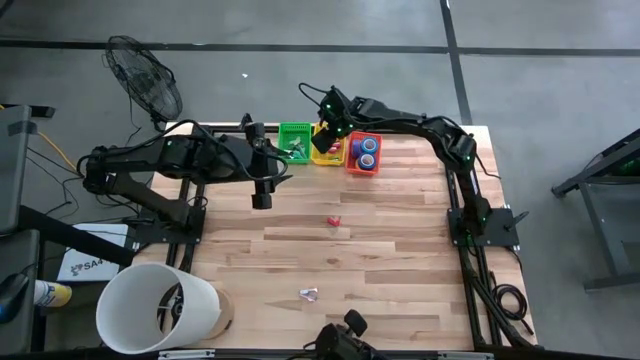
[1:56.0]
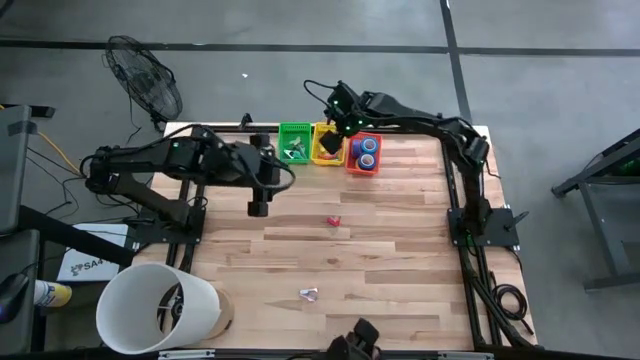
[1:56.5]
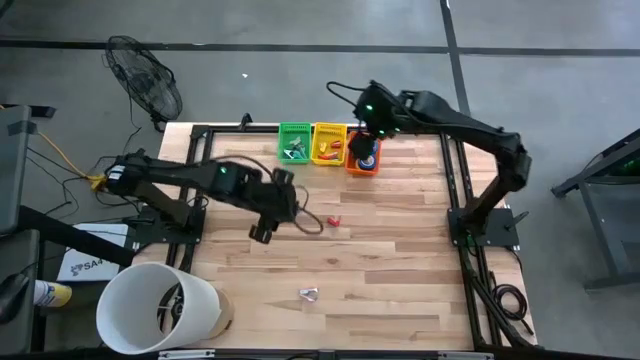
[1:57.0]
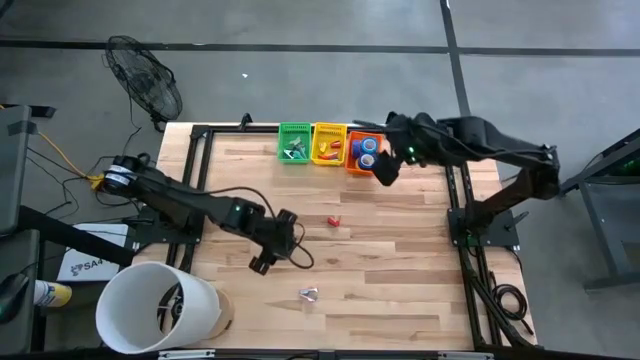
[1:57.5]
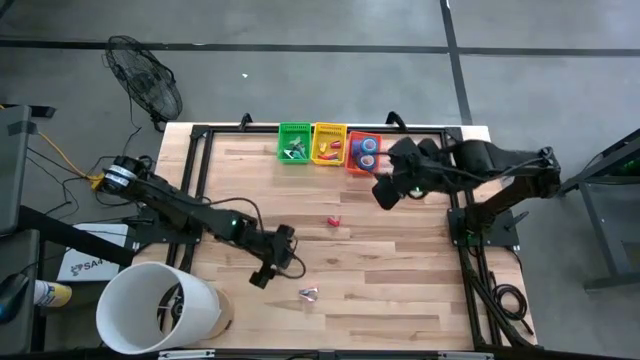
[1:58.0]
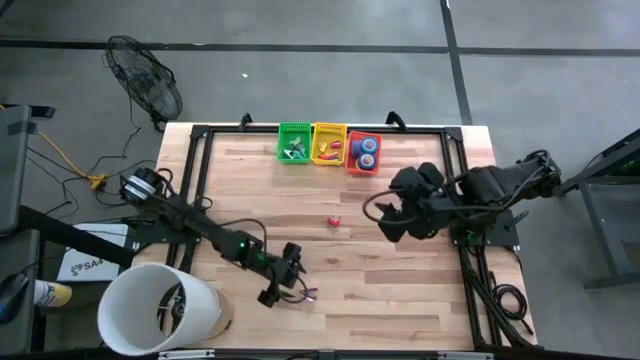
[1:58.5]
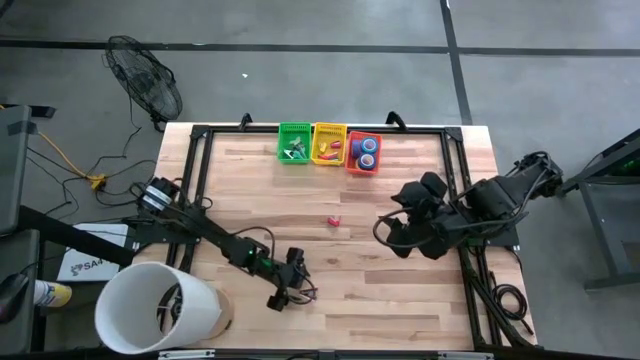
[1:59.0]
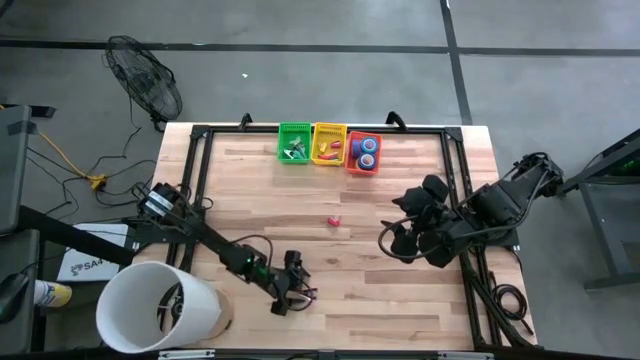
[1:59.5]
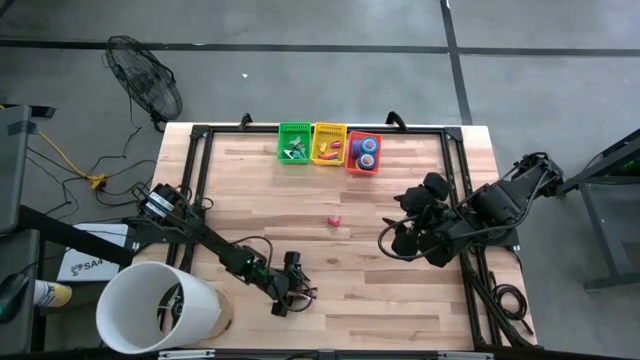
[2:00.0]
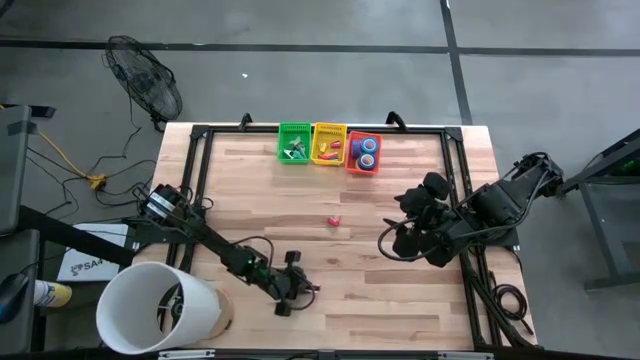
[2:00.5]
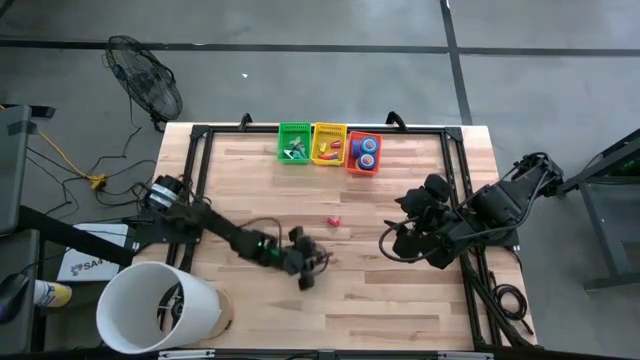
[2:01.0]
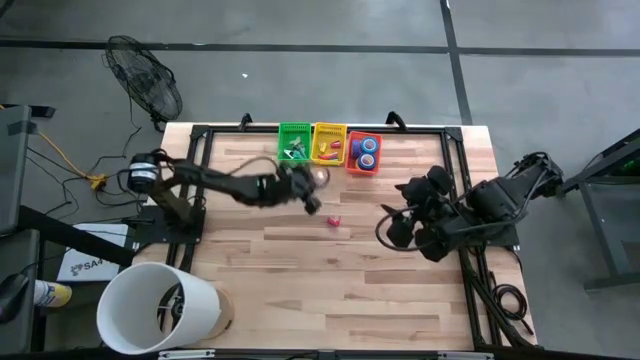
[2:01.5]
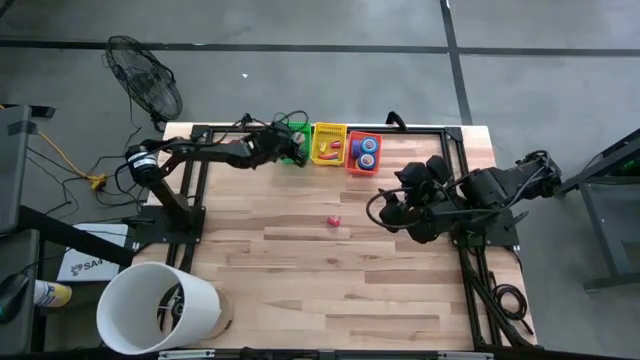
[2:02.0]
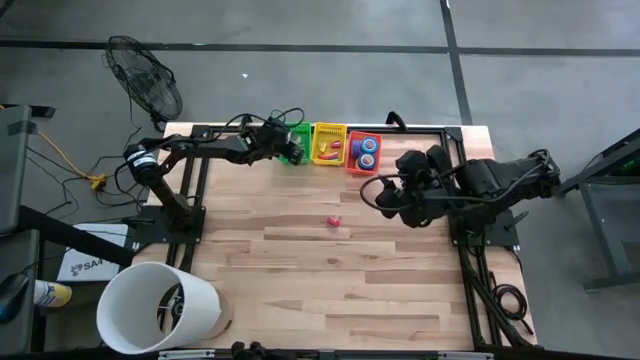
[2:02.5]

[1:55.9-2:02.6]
Task: Pick and place Stapler, Stapler remover, tape
Put the pink staple remover into the green bin

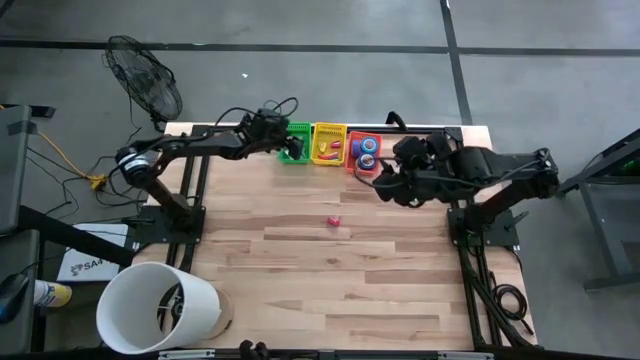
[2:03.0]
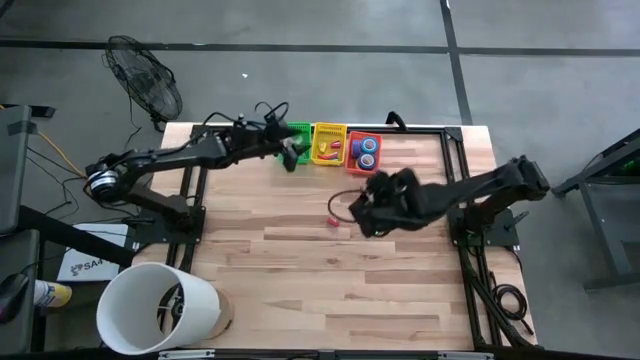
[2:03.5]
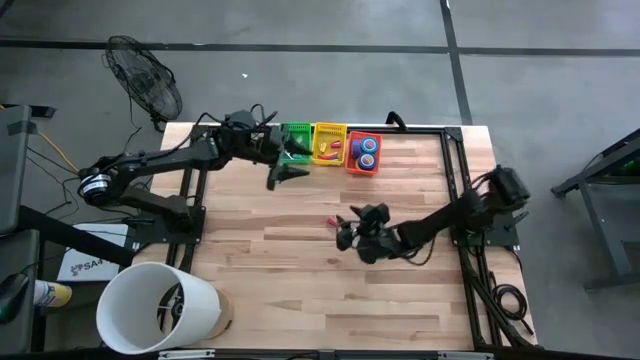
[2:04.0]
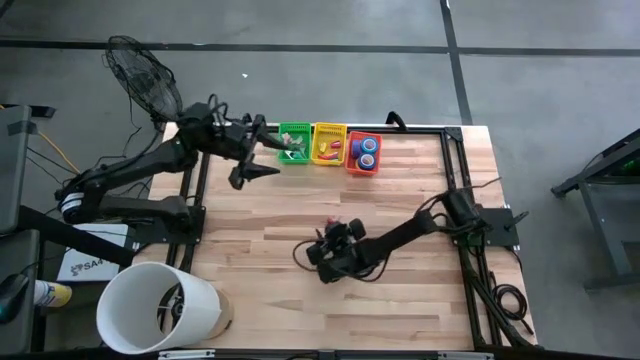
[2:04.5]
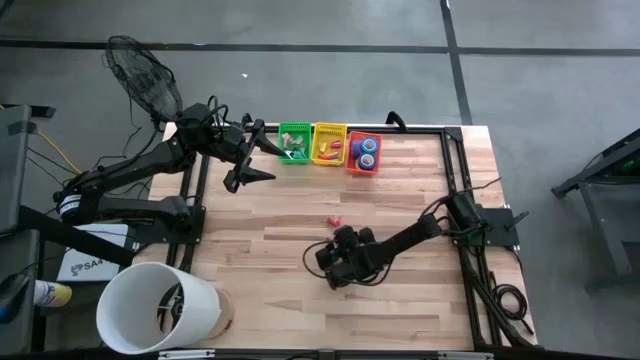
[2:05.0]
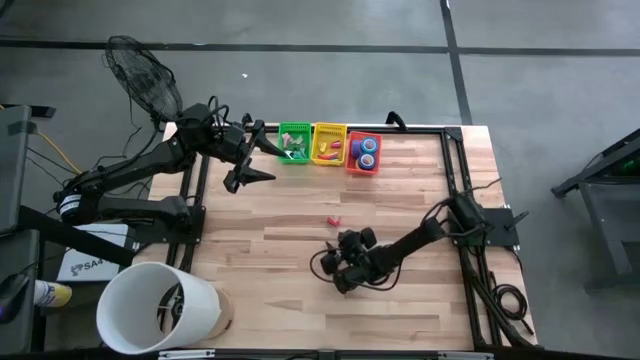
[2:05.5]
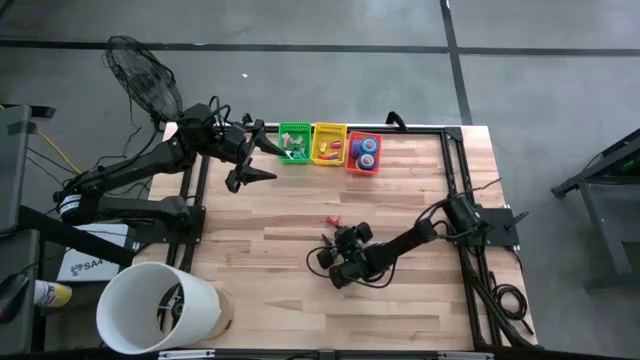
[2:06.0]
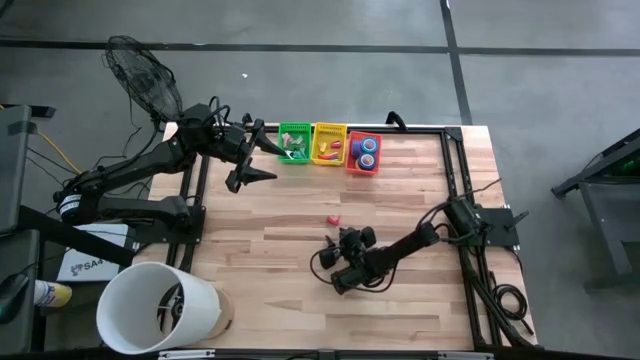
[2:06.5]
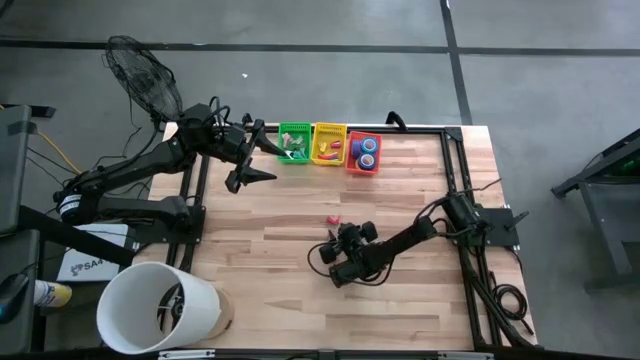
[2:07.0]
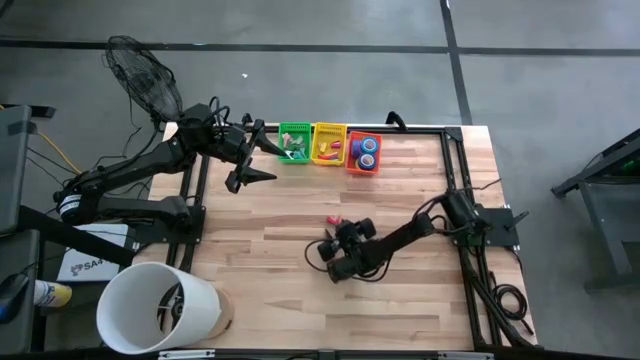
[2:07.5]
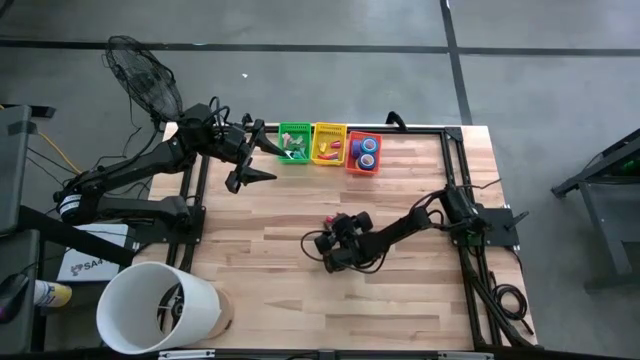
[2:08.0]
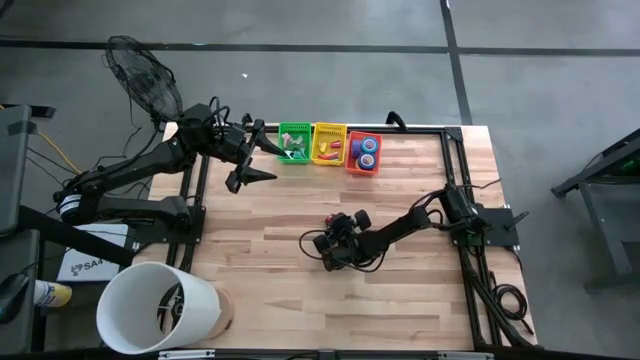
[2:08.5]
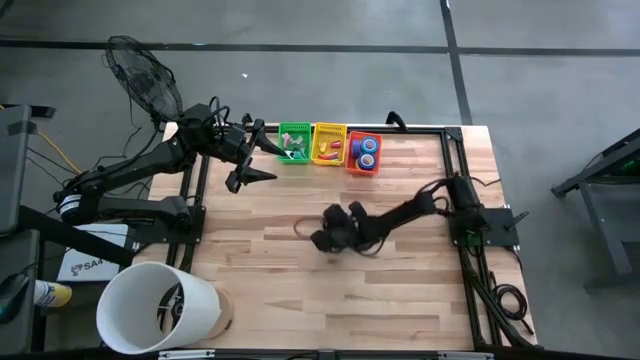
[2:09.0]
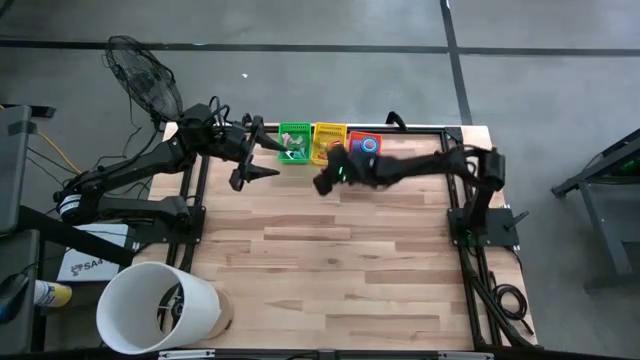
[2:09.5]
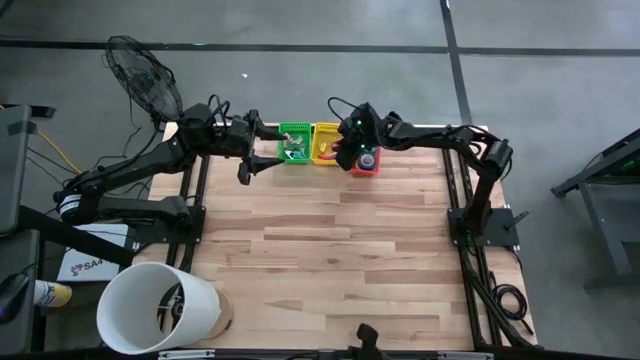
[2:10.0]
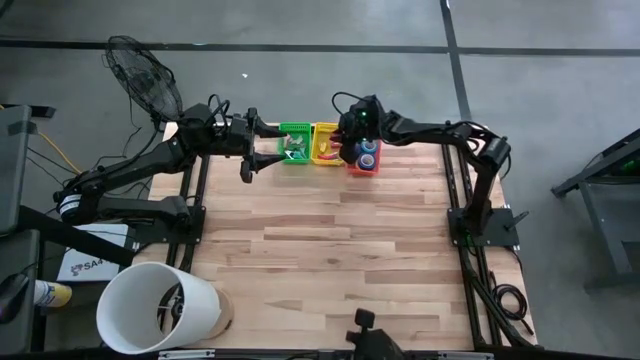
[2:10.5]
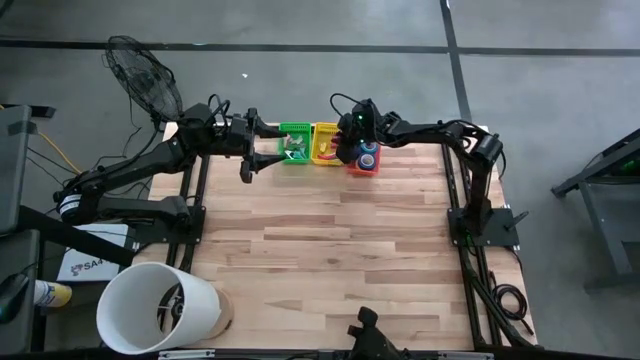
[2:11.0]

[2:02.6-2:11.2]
Put the red stapler into the yellow bin

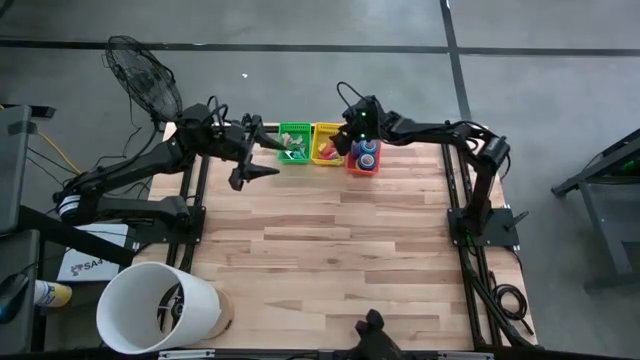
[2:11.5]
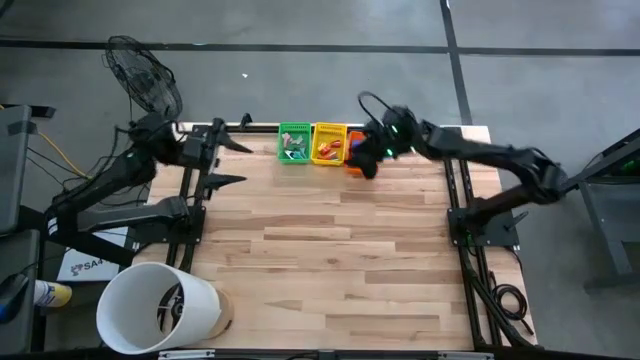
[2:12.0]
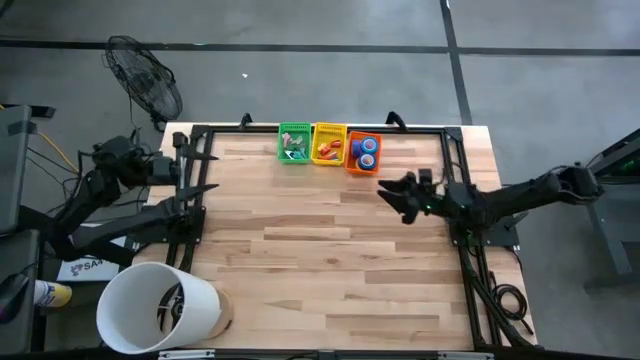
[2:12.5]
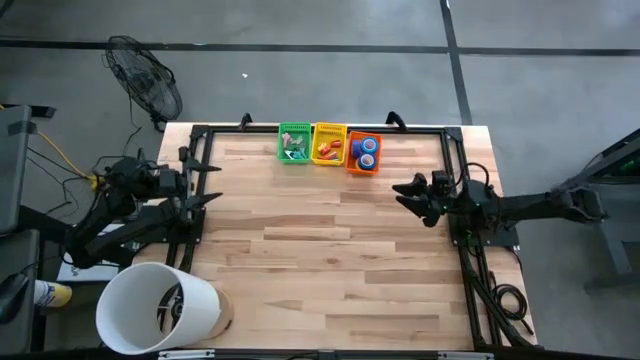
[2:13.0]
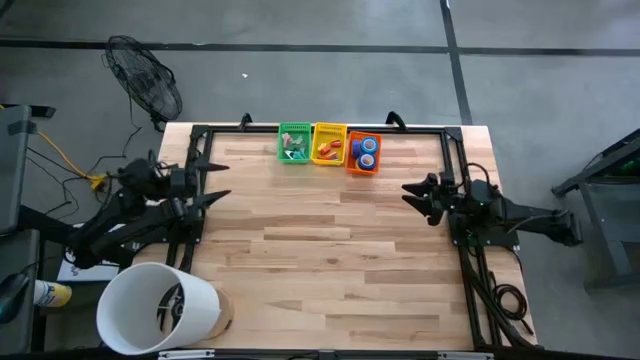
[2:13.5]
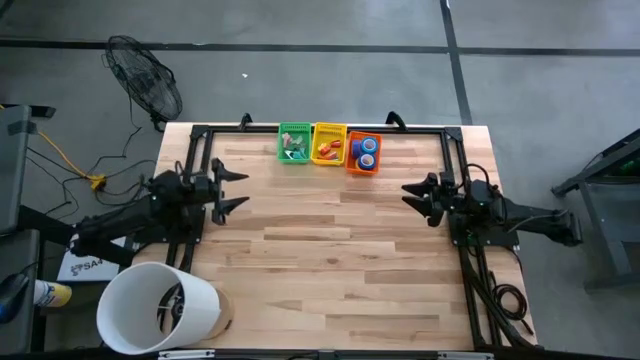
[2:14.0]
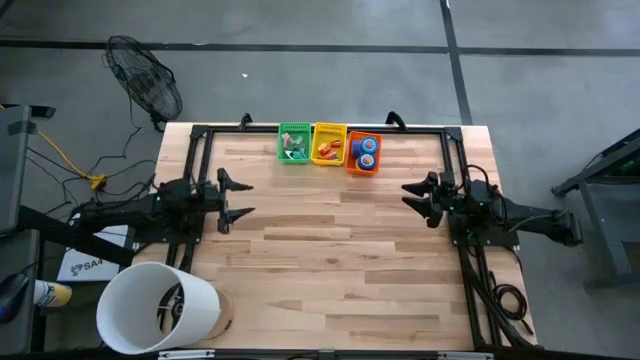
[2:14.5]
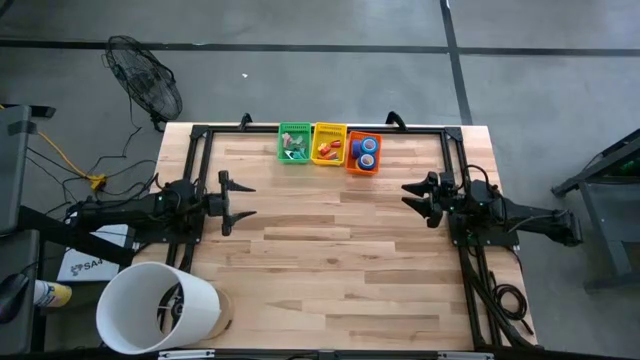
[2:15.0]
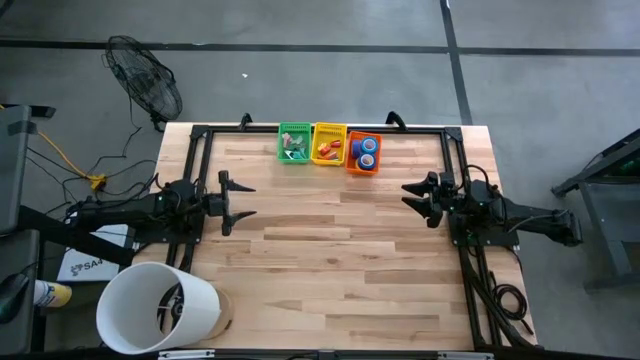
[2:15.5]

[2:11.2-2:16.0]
Return to Home Position

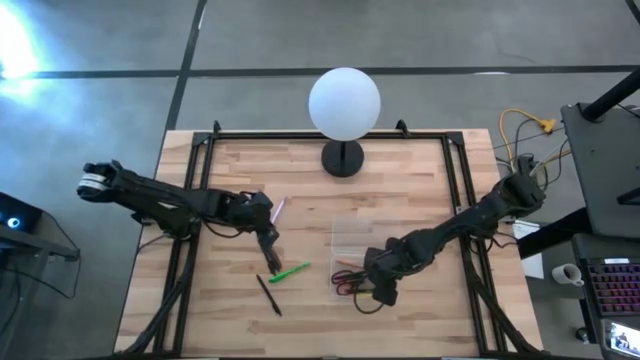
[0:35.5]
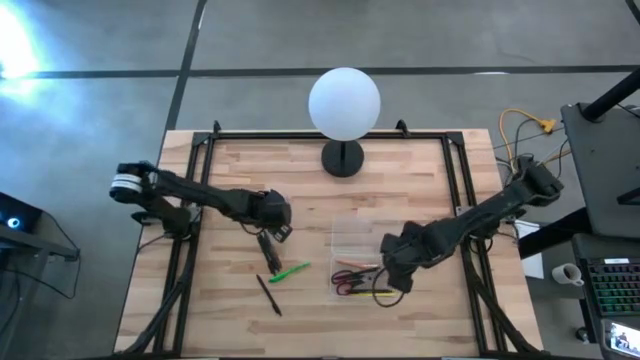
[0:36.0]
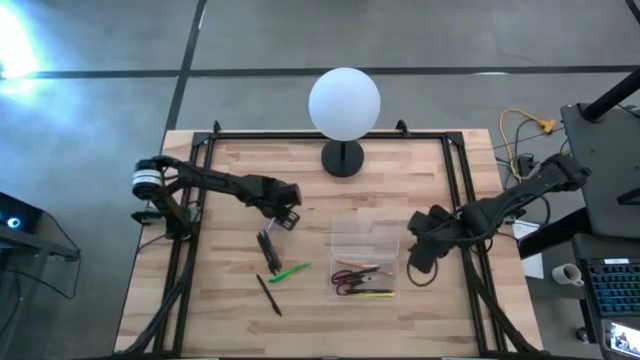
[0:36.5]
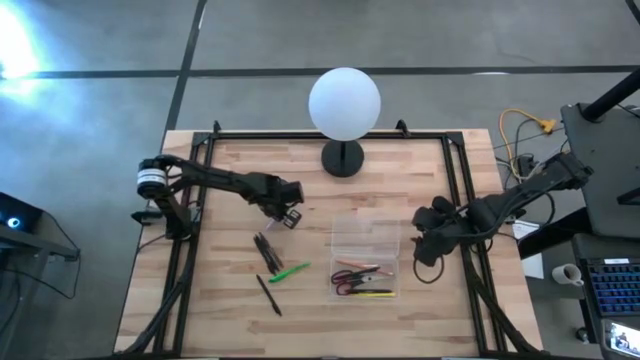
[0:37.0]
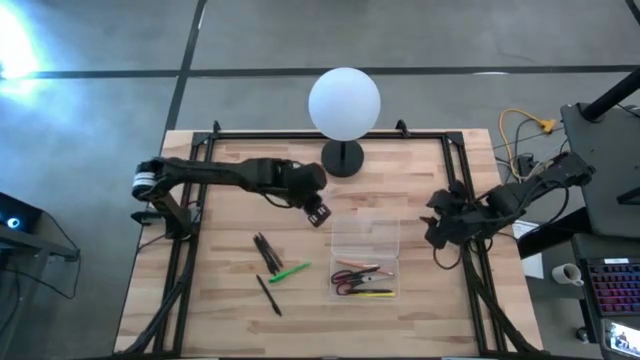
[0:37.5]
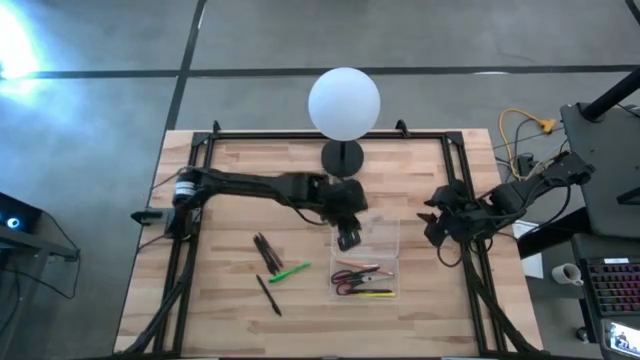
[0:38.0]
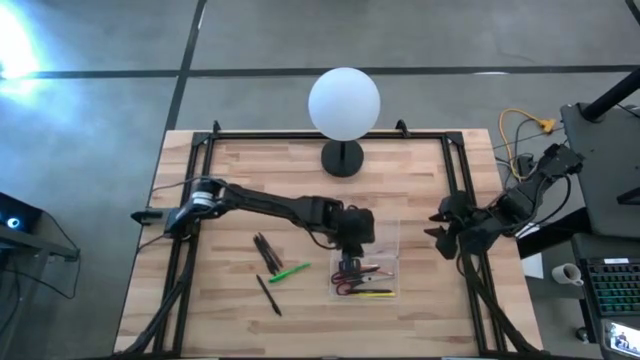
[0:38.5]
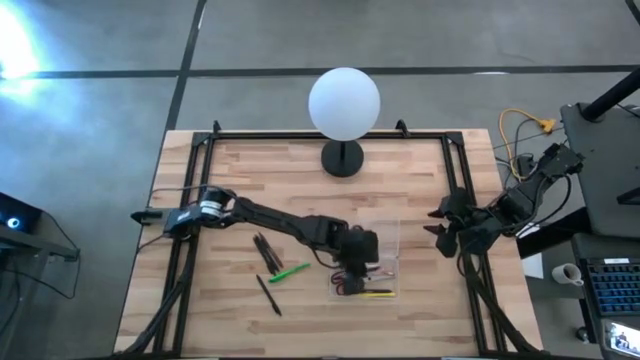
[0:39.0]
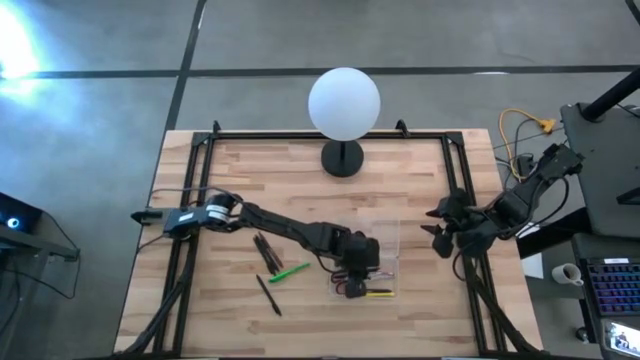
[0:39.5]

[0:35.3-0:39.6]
Task: Pick & place school supplies into a supply box
Put the purple pen into the transparent supply box
